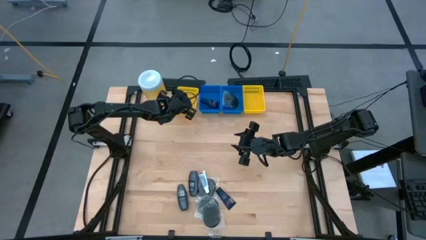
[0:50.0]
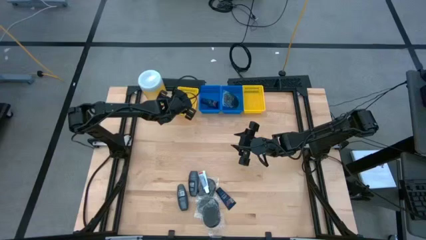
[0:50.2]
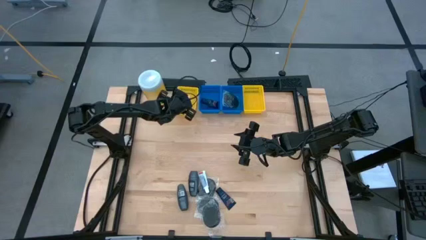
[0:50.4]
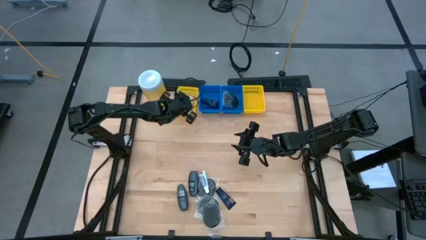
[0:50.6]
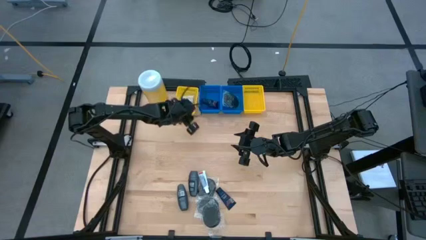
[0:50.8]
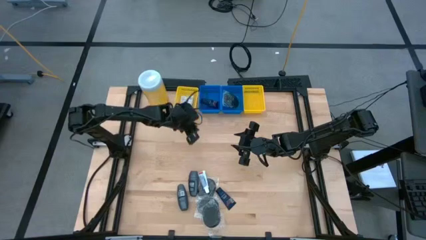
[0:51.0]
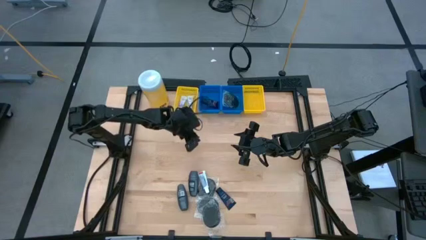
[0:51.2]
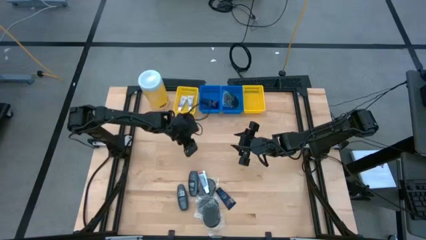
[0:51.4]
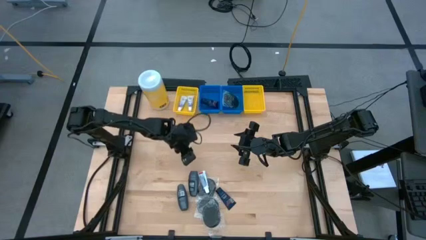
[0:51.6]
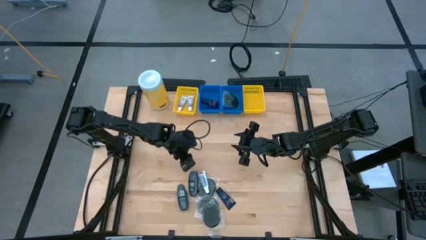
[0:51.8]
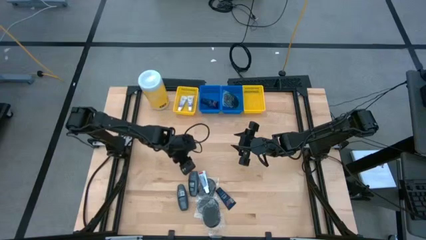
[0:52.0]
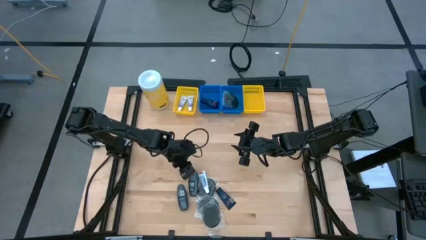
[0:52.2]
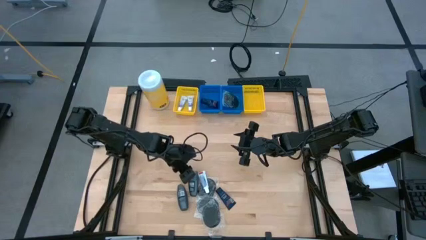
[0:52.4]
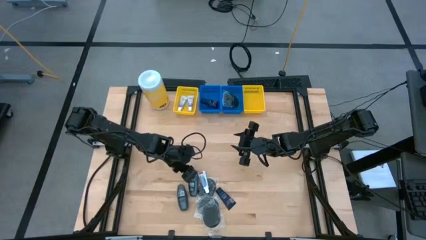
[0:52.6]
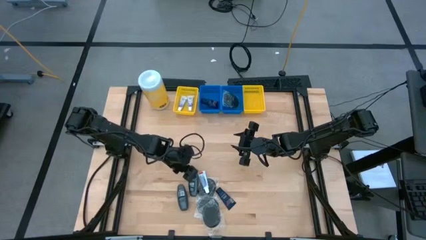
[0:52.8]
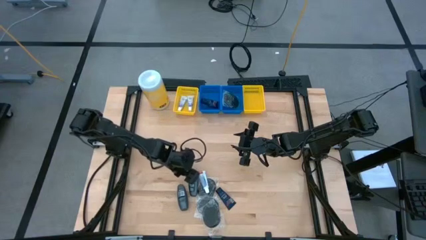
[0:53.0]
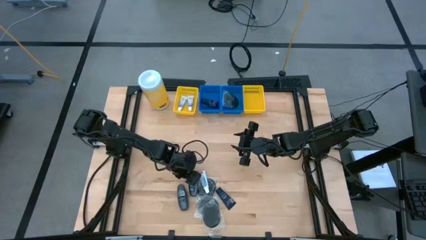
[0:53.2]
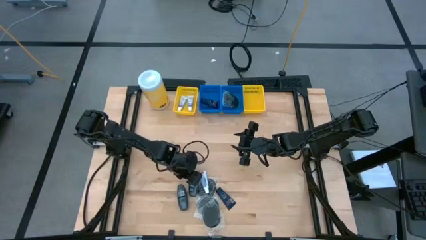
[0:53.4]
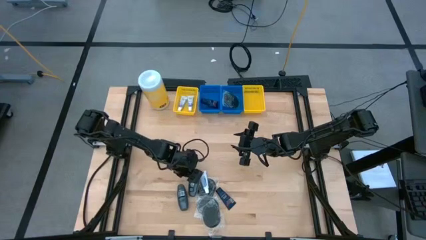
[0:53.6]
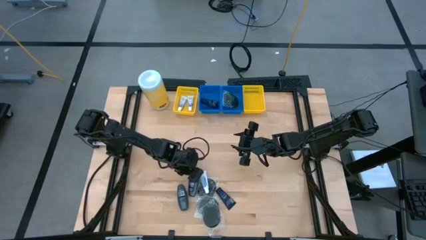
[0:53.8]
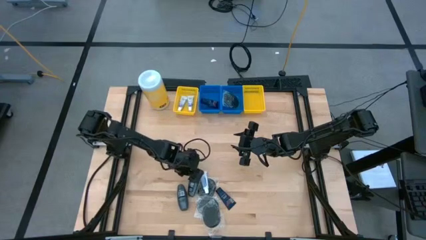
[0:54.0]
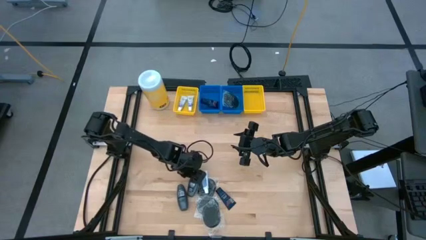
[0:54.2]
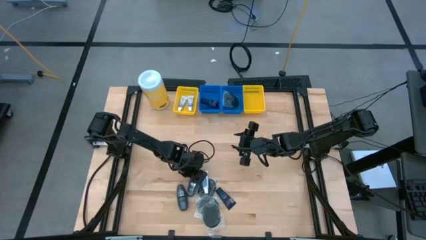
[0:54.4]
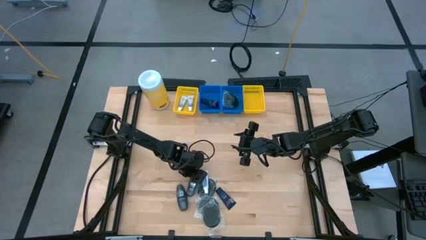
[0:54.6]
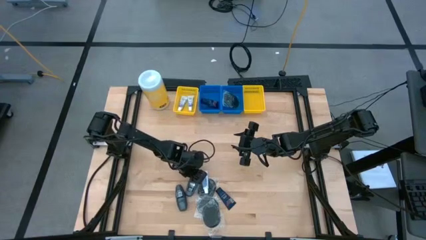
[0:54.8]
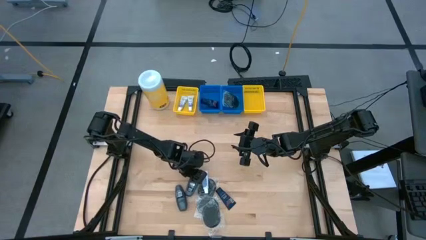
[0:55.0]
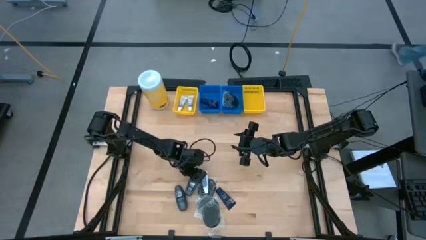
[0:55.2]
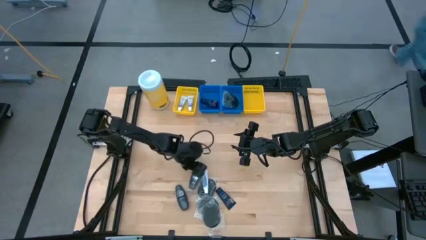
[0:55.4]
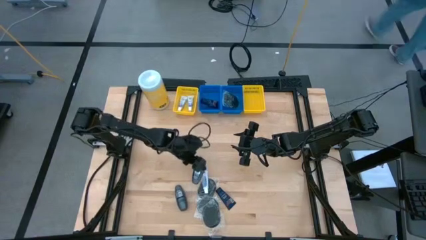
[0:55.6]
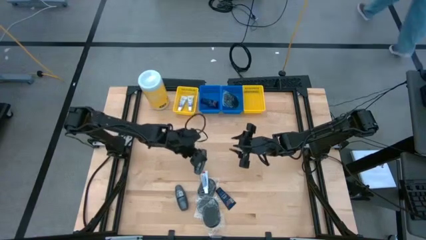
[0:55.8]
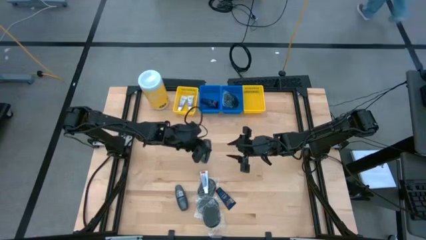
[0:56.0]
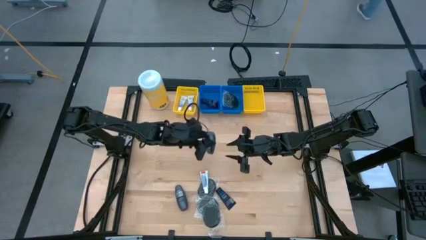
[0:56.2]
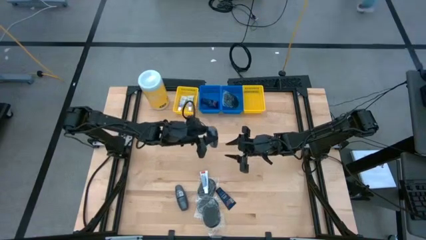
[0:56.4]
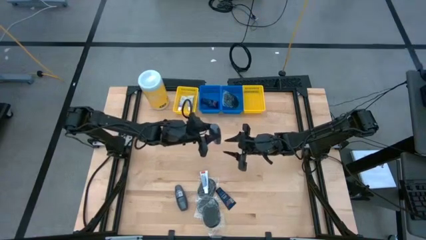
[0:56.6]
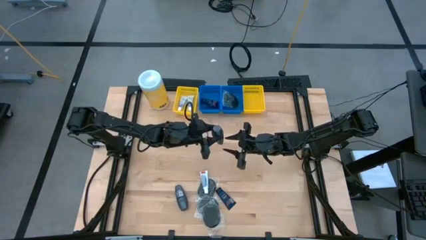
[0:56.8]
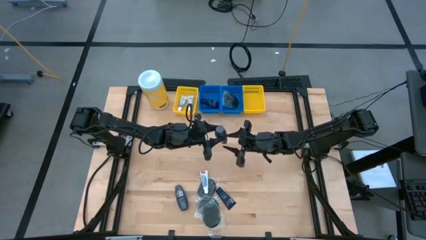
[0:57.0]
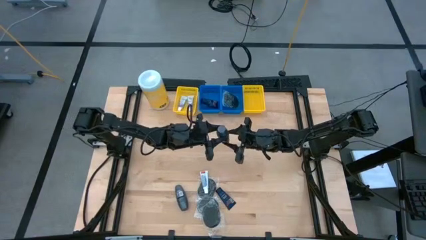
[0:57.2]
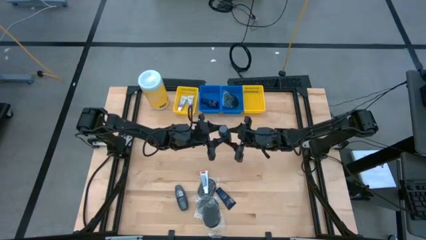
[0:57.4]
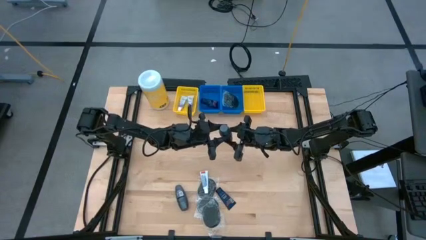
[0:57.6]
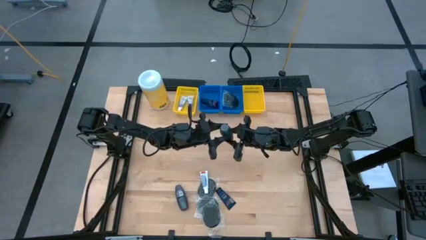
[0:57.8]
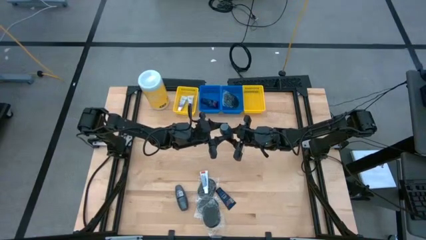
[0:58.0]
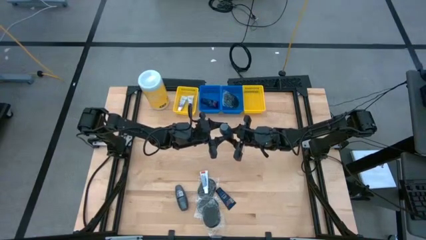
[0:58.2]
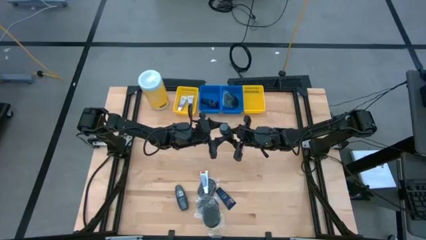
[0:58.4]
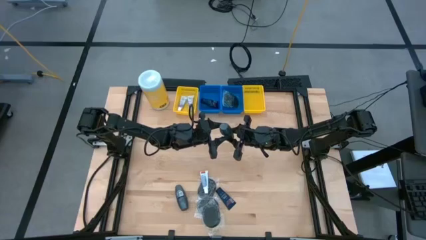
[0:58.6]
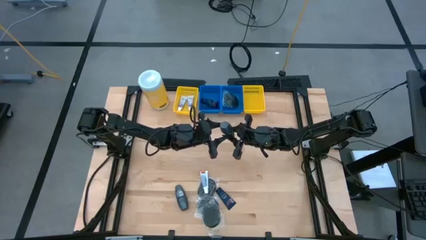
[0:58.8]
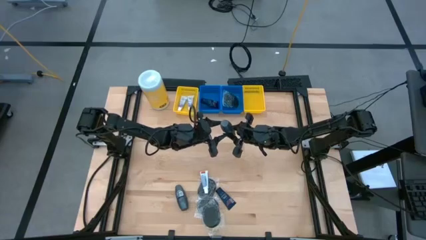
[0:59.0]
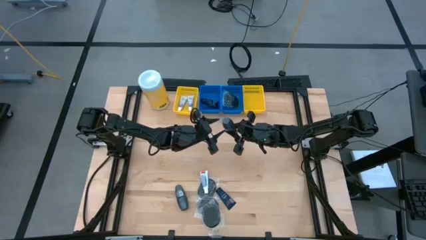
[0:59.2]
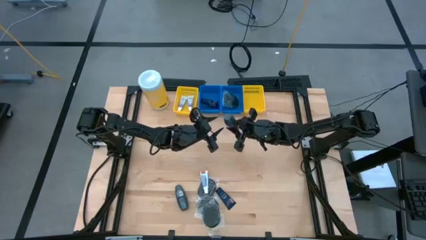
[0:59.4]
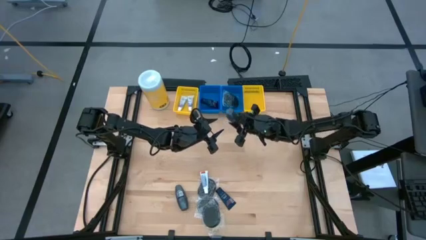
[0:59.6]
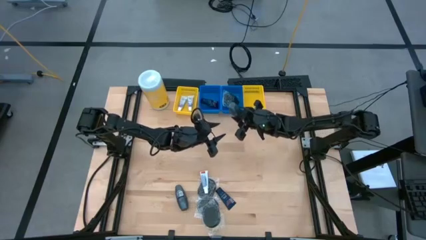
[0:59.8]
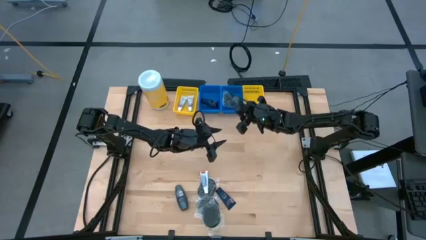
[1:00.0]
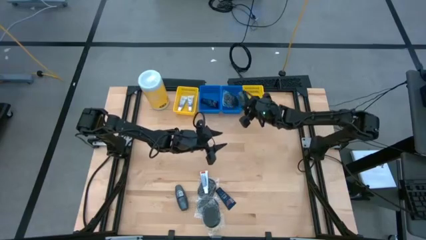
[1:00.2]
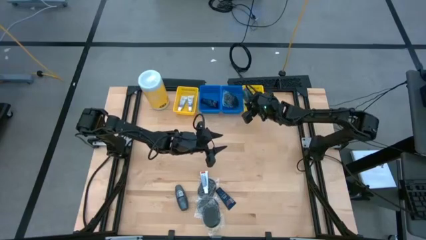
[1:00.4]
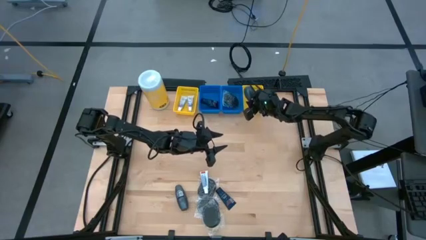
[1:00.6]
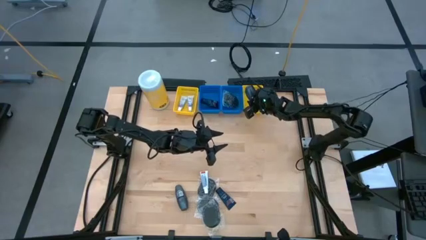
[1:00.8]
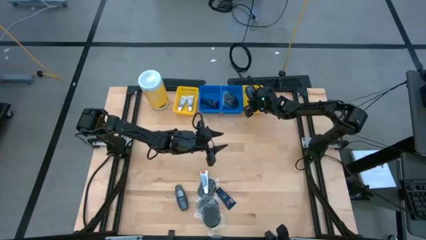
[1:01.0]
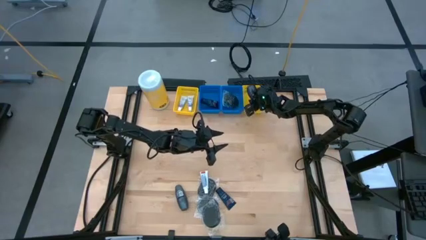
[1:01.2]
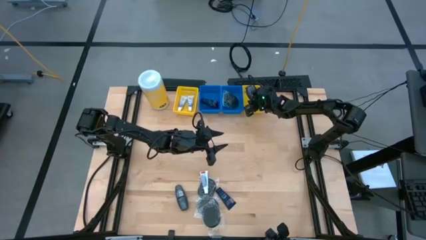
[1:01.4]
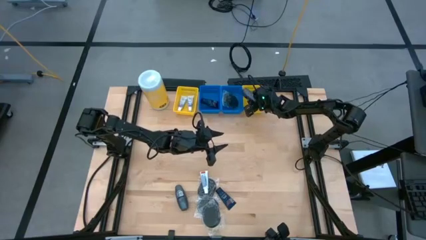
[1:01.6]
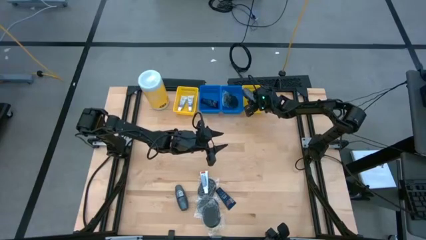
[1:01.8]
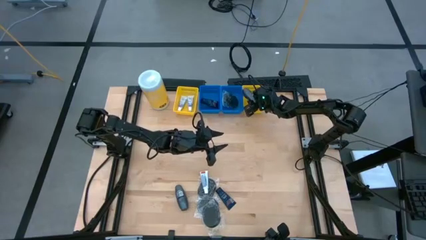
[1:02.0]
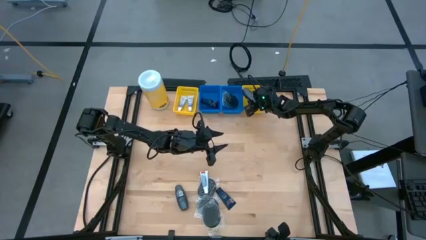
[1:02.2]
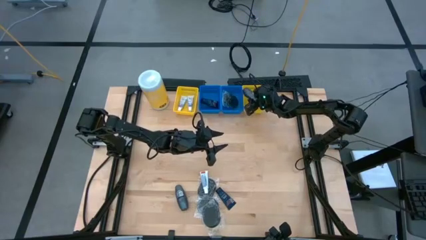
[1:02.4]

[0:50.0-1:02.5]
Task: Pick & Place Travel size toiletries
Put the deodorant into the right yellow bin
